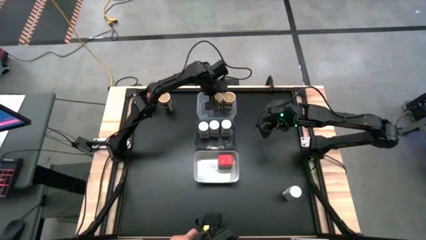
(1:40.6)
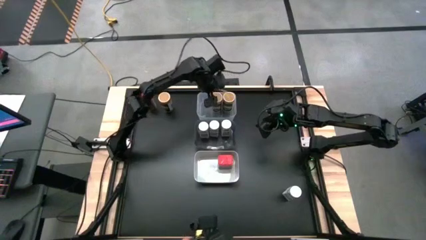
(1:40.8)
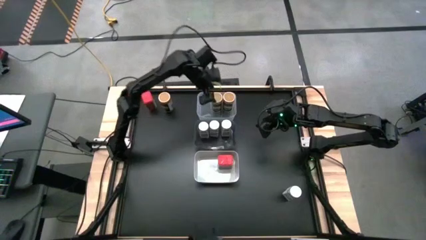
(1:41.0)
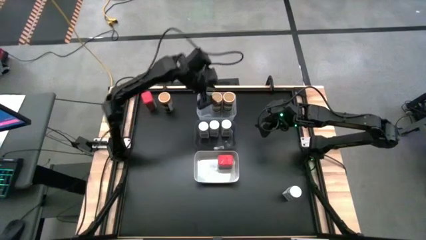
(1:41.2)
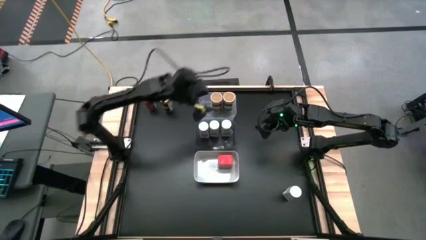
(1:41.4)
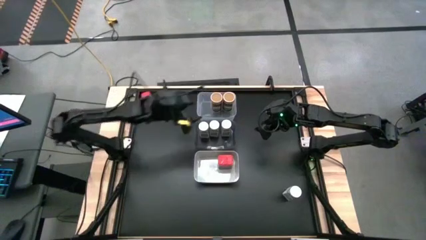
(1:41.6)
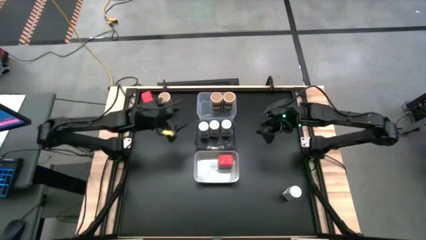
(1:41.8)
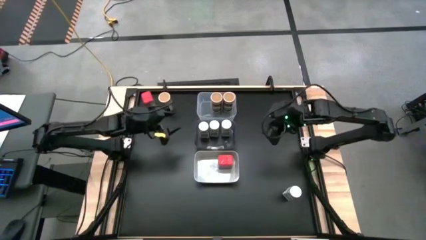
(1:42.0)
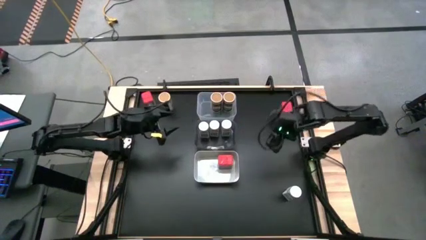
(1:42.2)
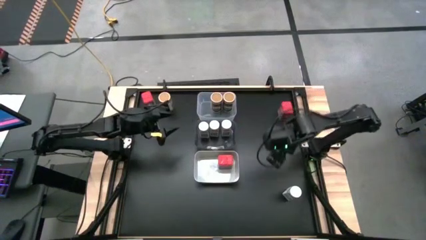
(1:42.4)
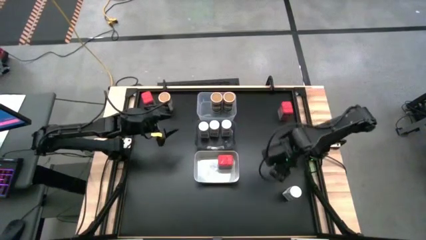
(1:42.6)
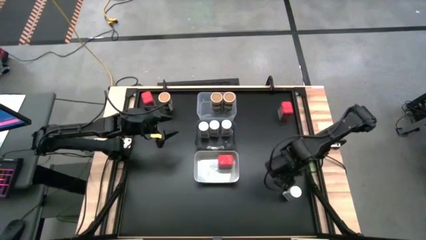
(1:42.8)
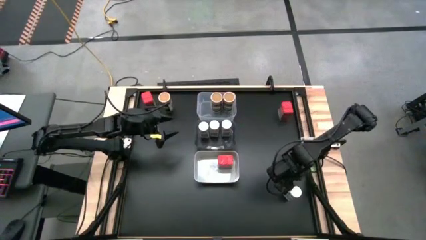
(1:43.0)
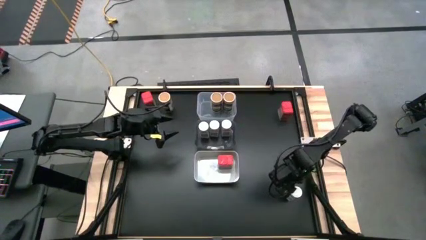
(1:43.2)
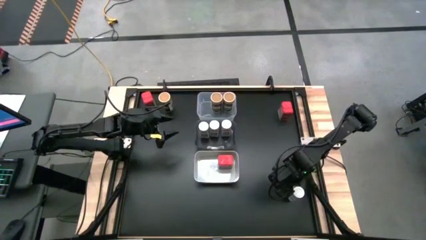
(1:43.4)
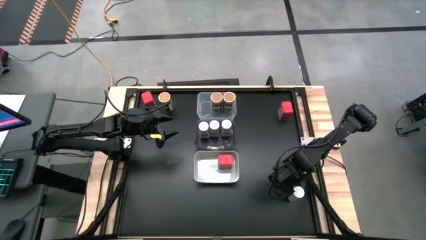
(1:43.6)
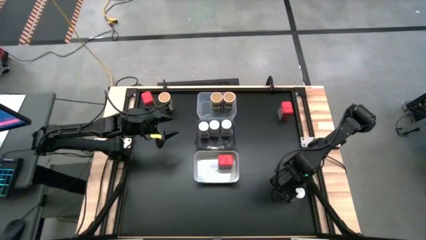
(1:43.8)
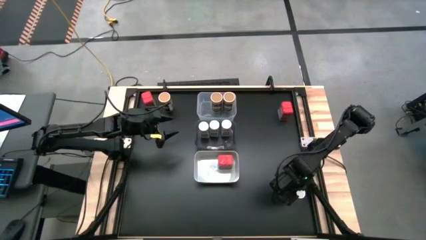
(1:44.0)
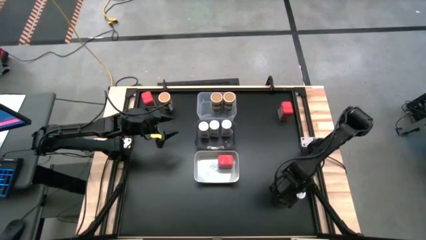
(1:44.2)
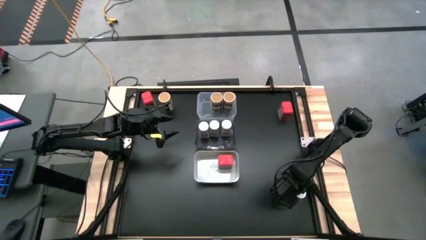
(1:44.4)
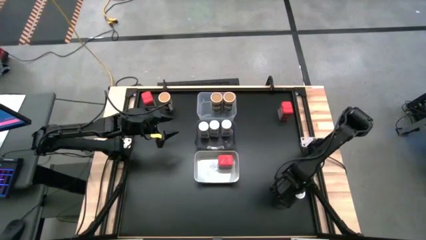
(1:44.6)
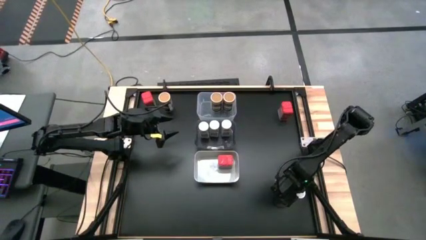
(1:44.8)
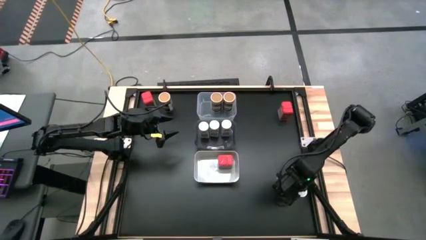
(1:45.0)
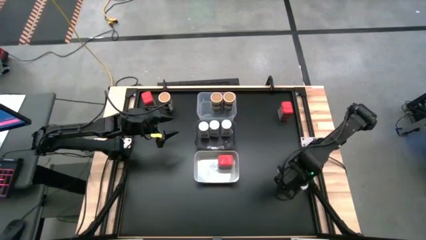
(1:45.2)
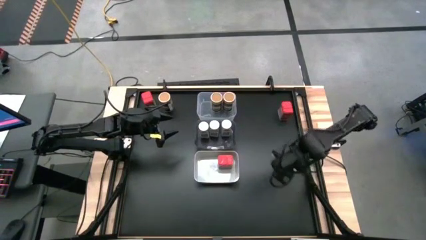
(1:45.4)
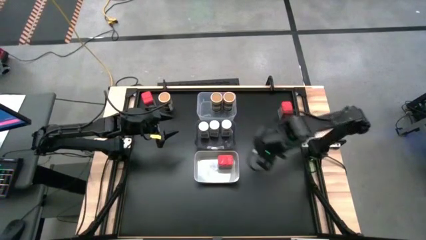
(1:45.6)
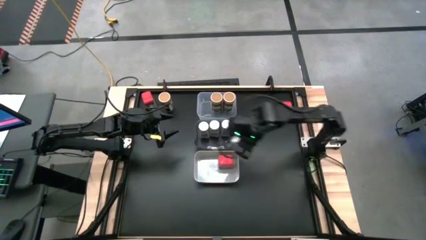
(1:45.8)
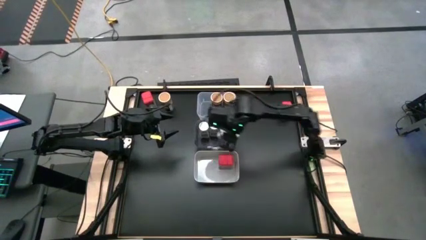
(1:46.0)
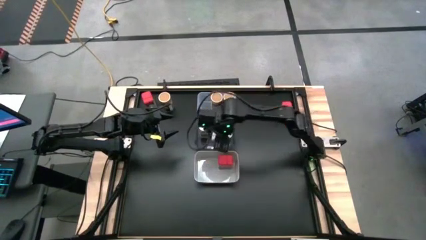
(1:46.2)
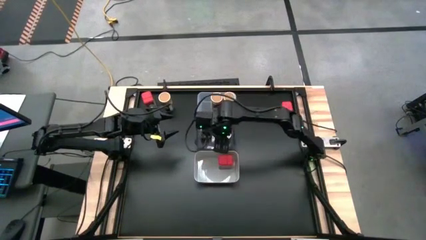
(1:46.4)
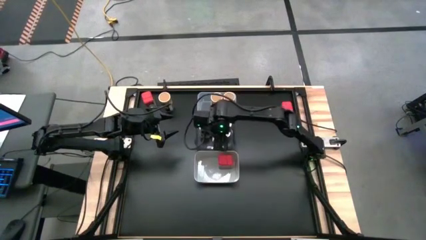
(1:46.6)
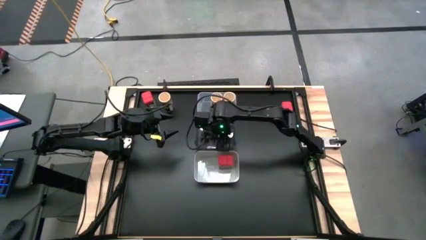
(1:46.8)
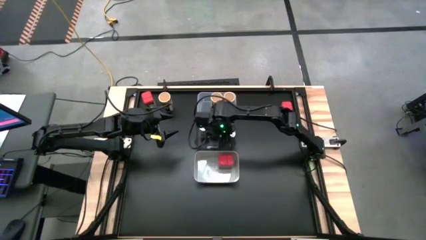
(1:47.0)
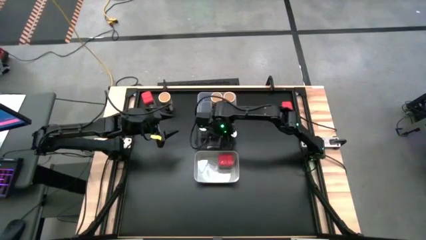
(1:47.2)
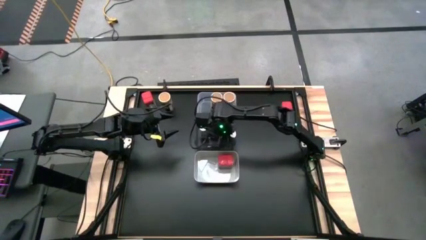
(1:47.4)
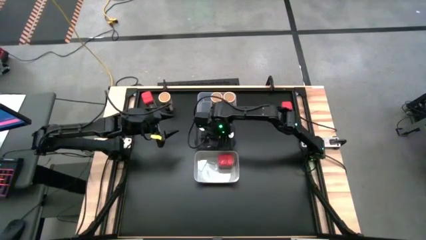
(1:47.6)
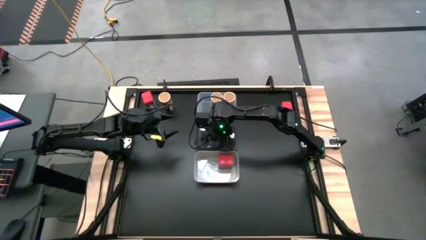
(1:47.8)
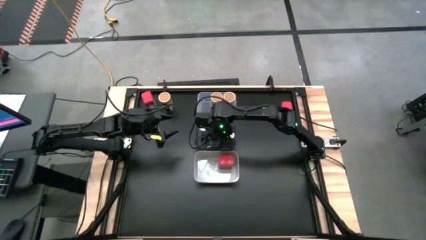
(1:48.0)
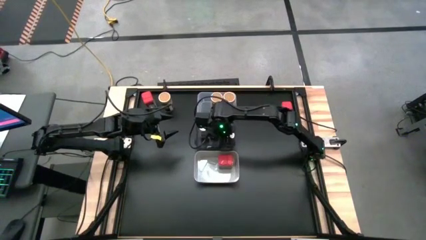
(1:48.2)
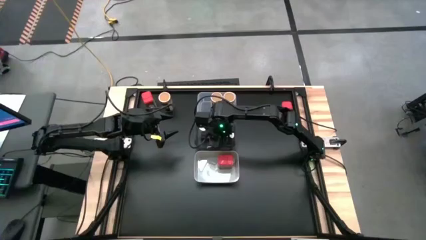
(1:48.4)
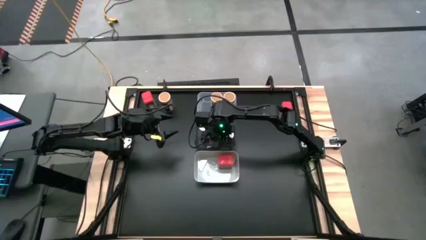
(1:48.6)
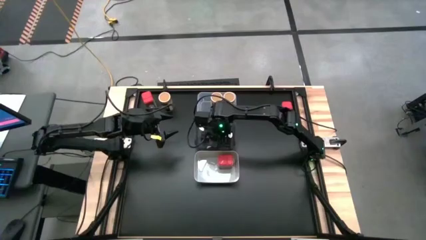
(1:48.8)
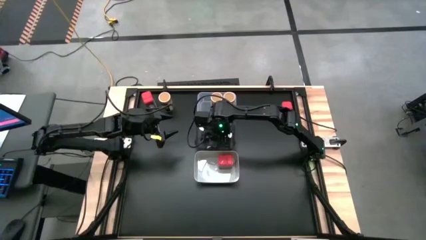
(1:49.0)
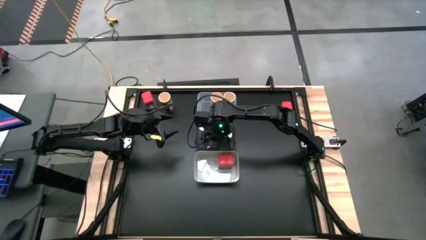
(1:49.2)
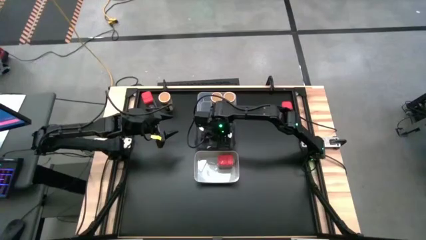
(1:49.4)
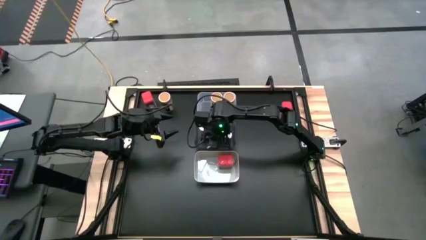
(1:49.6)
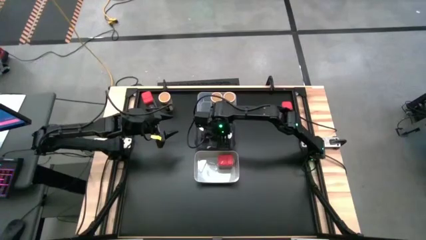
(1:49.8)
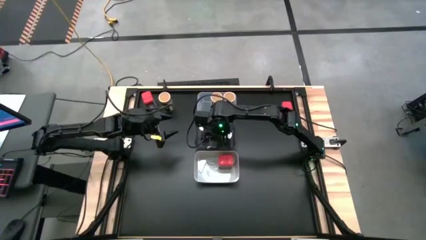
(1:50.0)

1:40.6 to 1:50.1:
Task: Sort spices by type
Put the white seasoning bottle into the black transparent bin in front of the other white seasoning bottle
